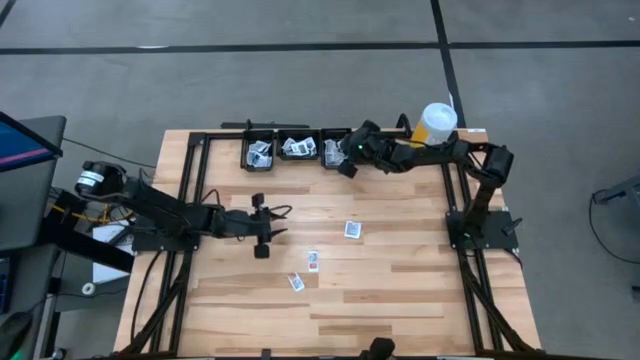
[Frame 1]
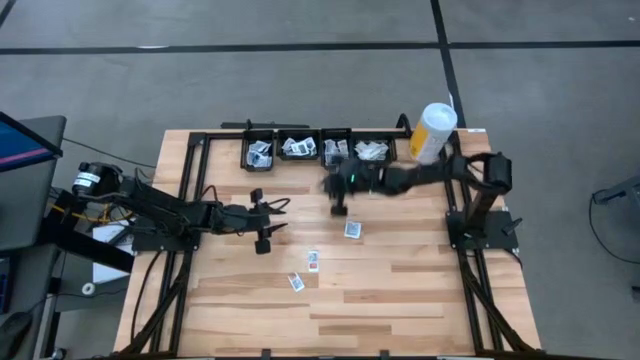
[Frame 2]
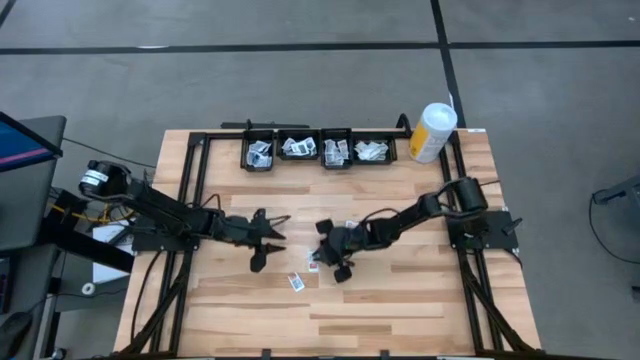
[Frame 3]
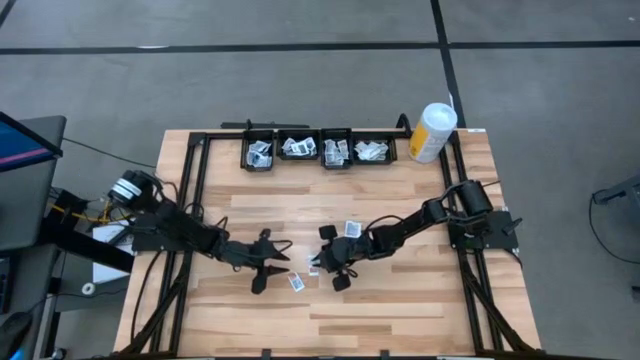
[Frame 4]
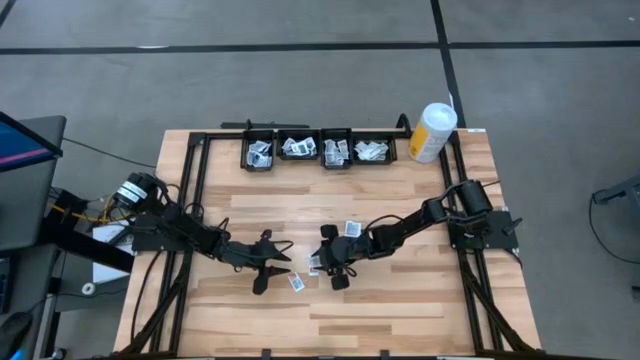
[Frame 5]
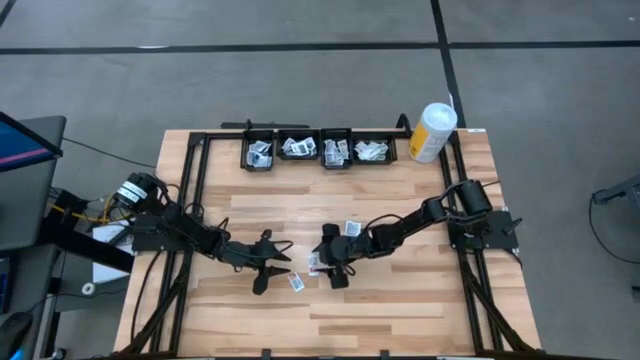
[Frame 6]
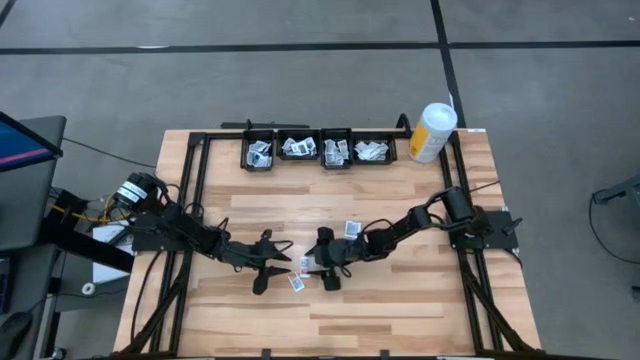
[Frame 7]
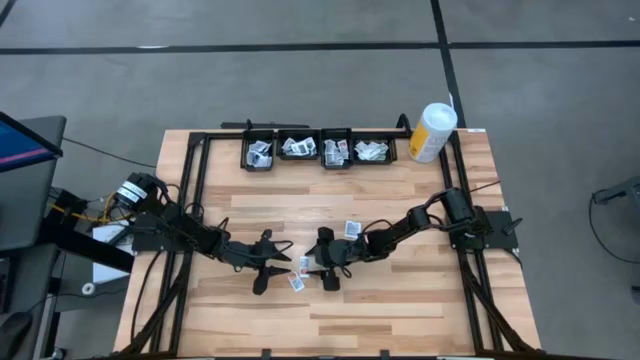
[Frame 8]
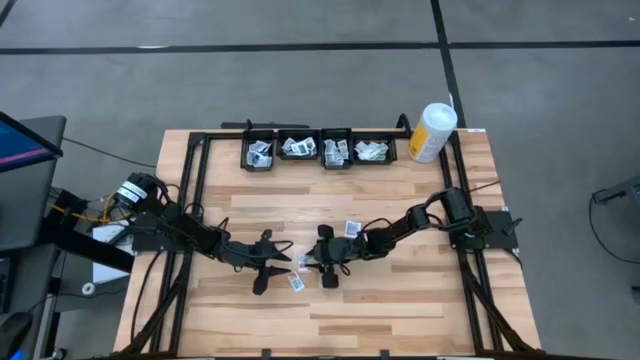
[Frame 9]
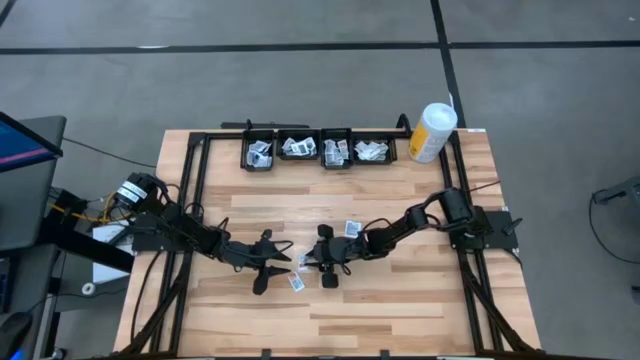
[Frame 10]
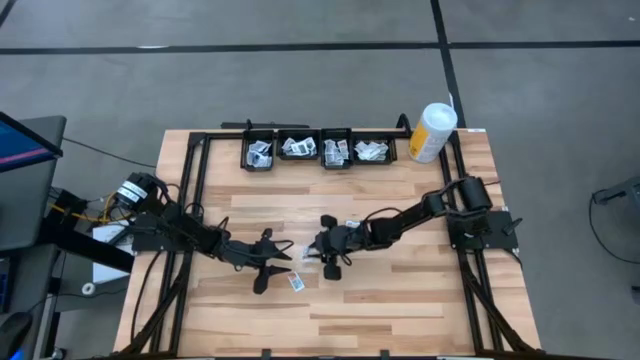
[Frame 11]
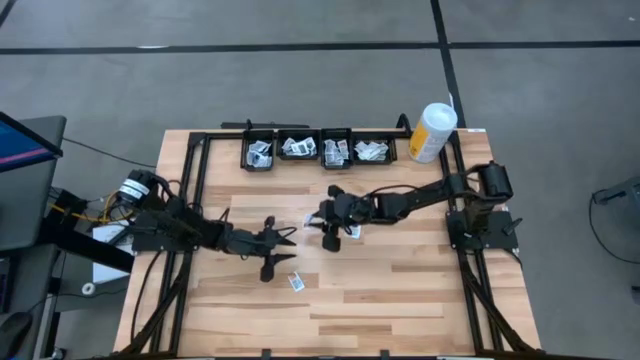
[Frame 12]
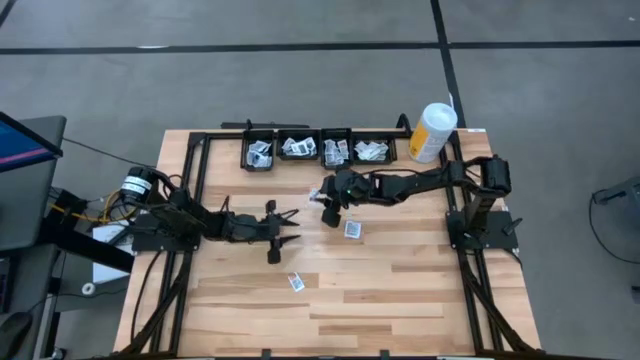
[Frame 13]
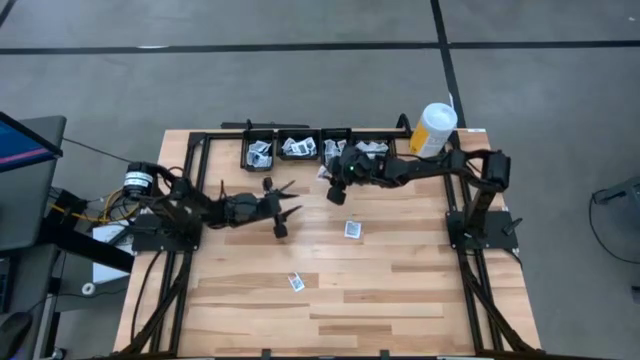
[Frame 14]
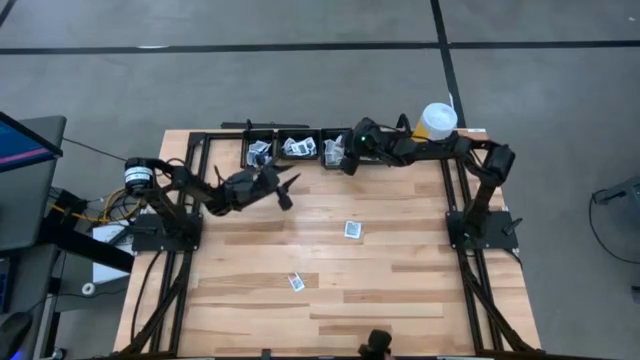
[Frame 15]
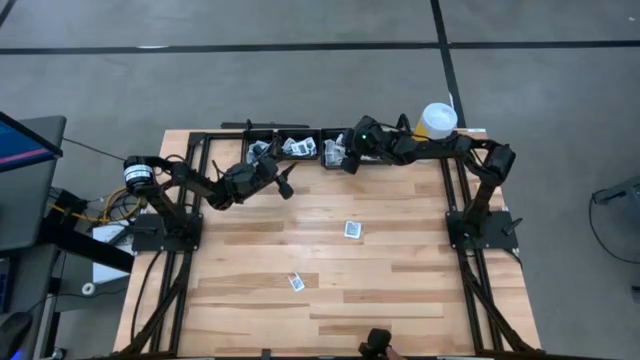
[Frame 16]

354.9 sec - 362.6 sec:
Task: Pick & Place First Aid Supplies
Put the orange ointment pack into the middle right black bin

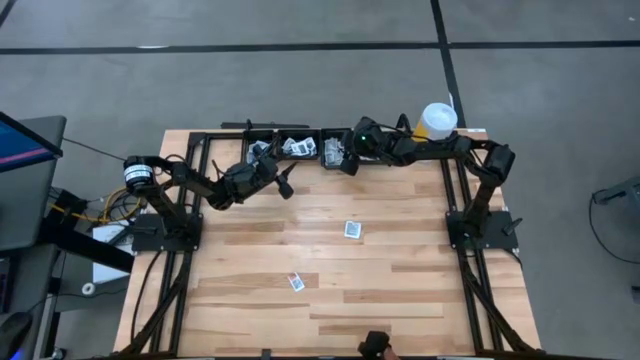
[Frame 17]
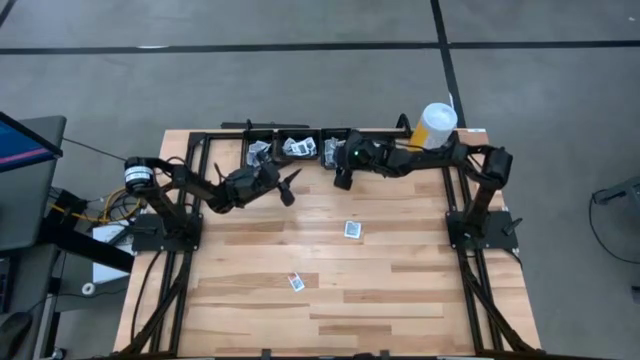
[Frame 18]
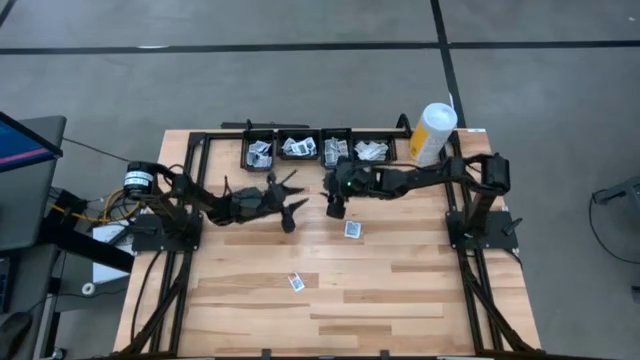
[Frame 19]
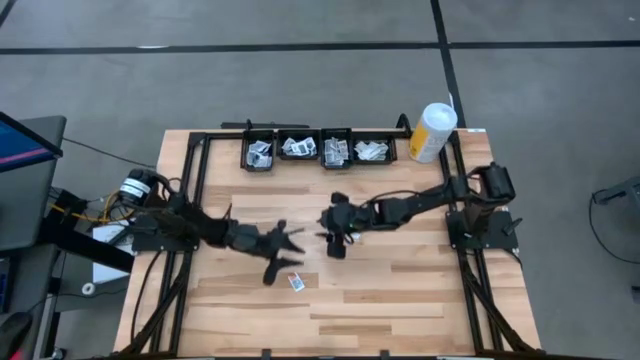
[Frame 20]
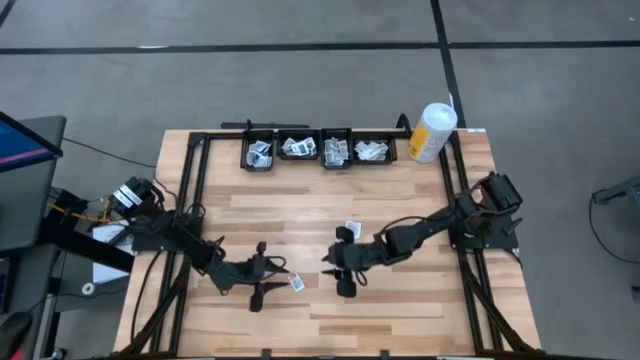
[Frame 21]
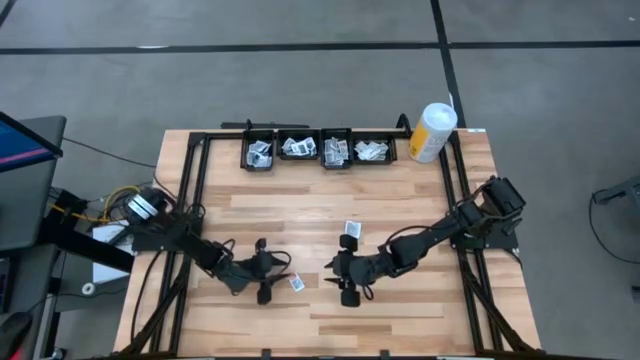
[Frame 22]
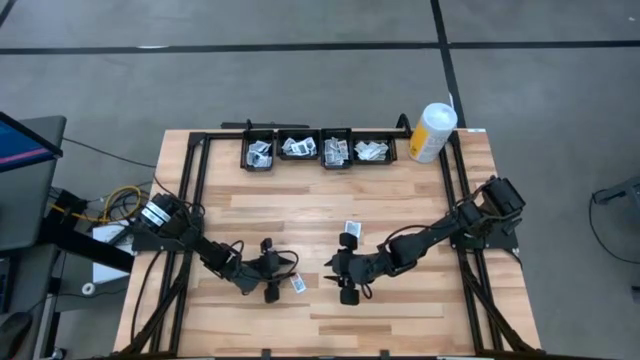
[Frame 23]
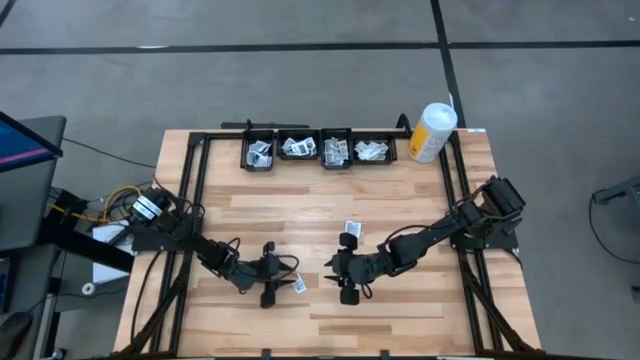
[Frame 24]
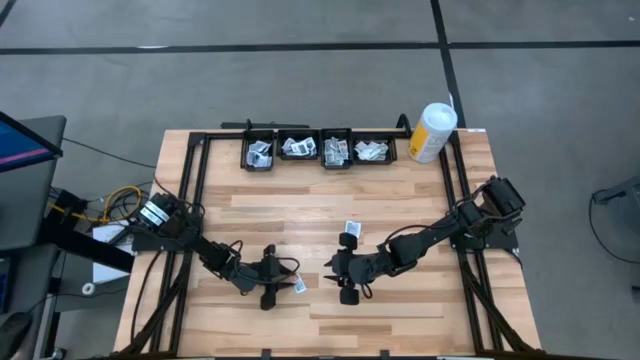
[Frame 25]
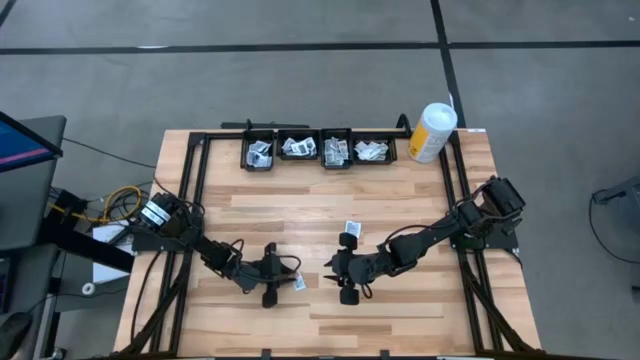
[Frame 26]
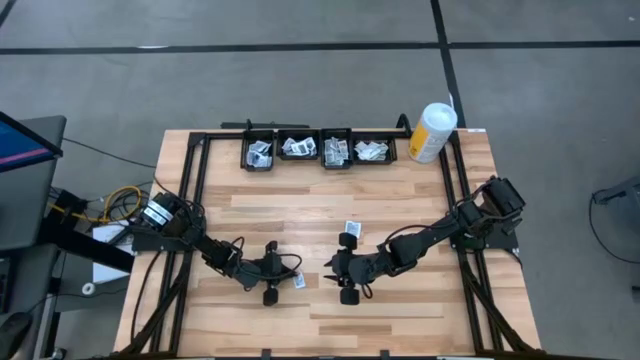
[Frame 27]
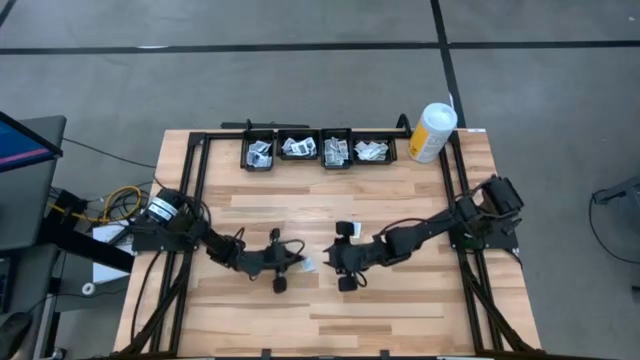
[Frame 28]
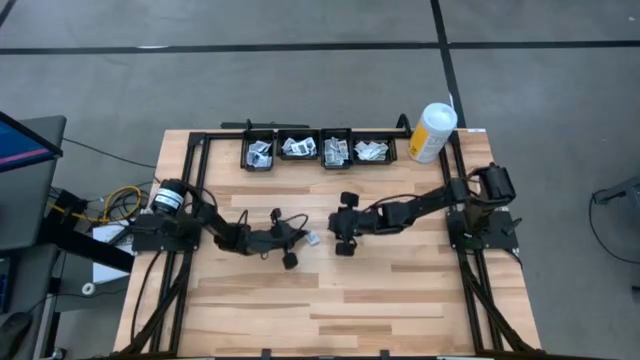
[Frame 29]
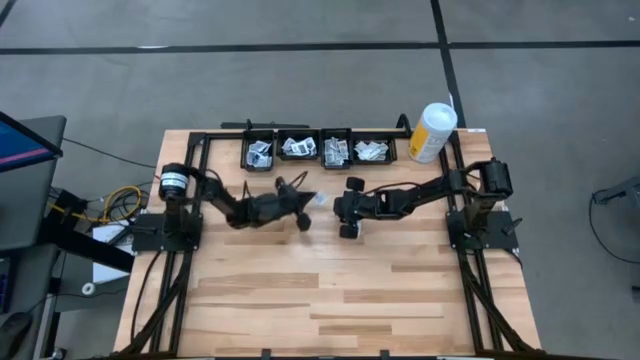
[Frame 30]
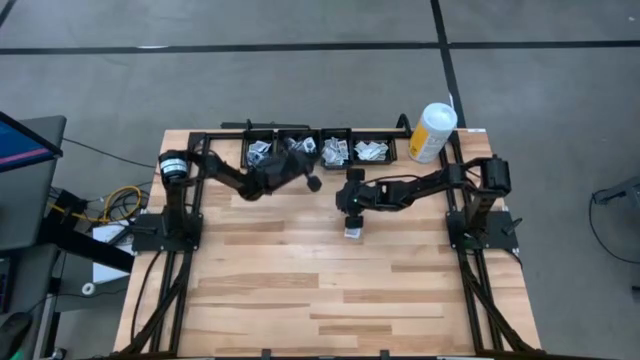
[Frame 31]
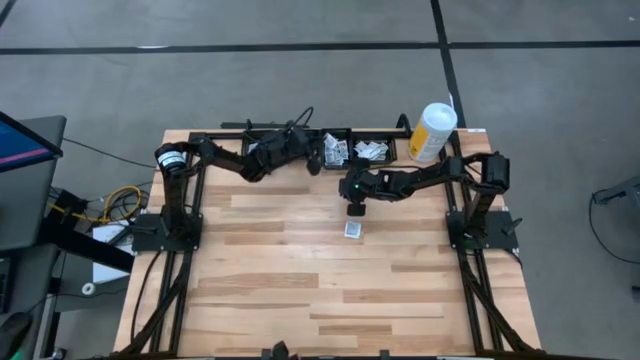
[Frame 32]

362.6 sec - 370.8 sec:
Put the orange ointment pack into the middle right black bin

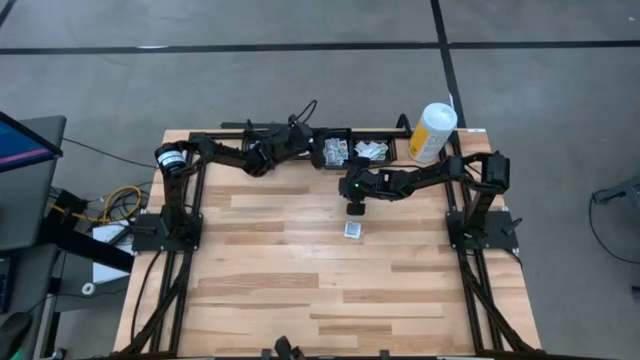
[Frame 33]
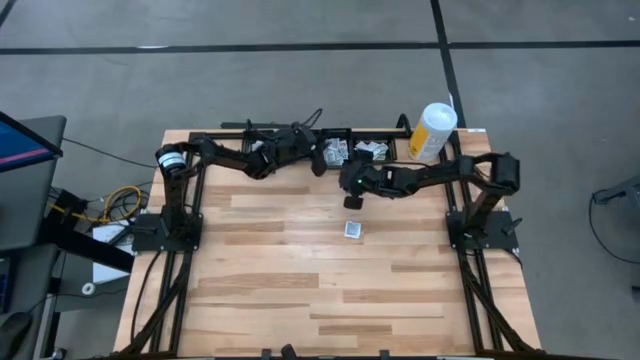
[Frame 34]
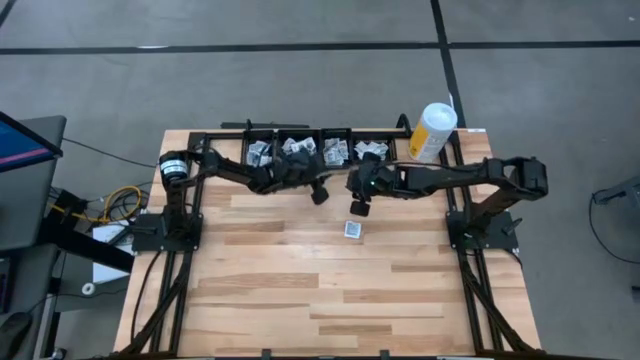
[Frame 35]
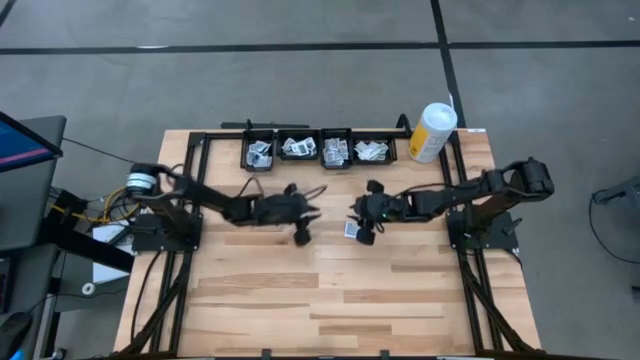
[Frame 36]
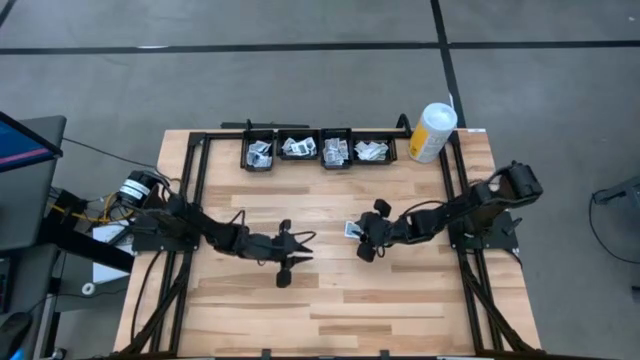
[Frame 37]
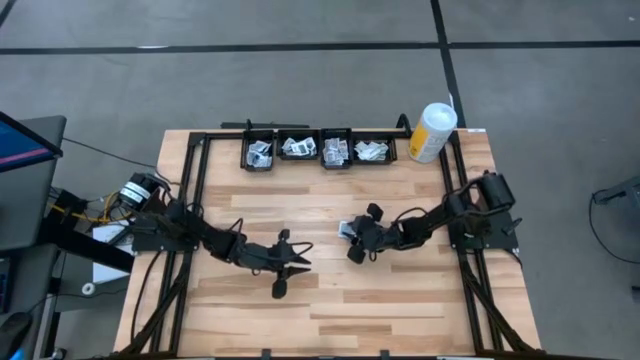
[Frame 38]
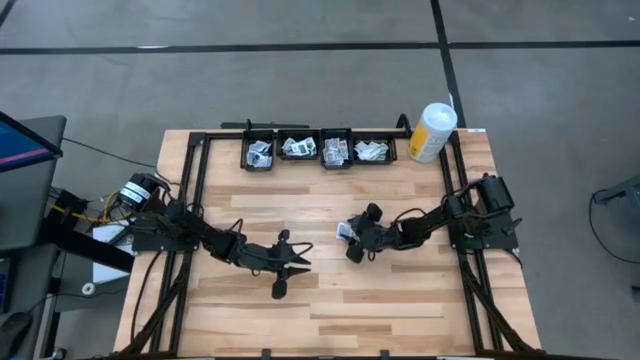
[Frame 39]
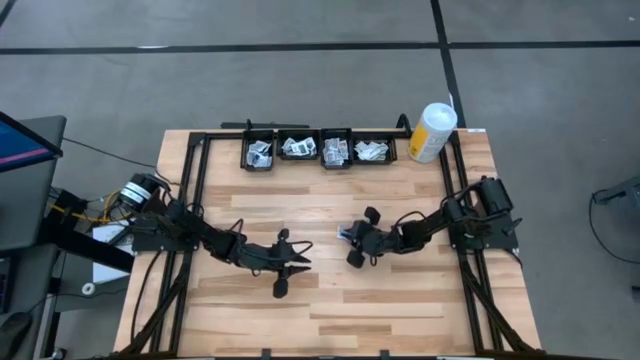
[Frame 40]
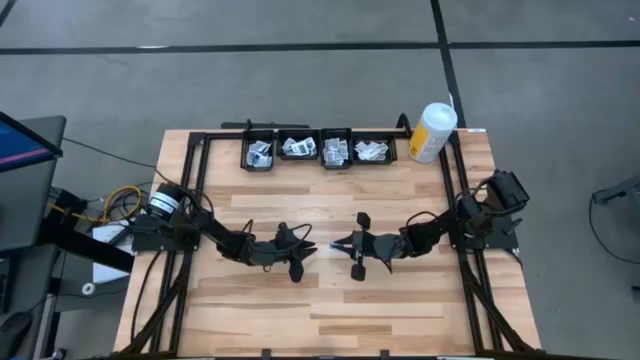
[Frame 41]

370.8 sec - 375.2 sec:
Put the black towelette pack into the middle left black bin
